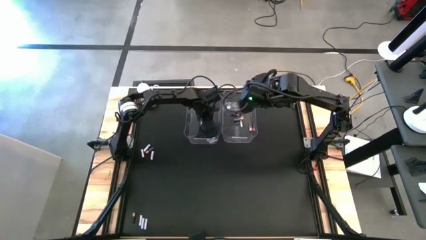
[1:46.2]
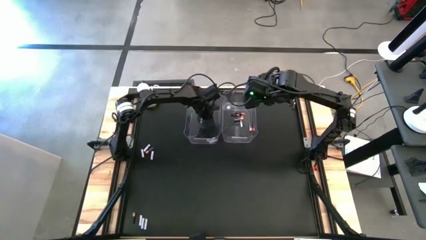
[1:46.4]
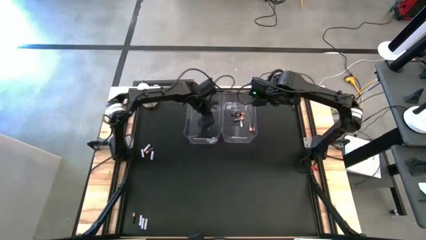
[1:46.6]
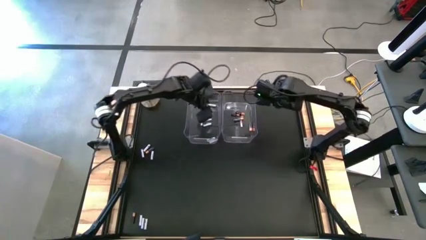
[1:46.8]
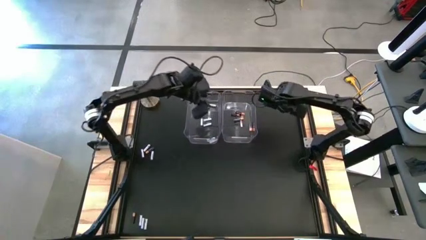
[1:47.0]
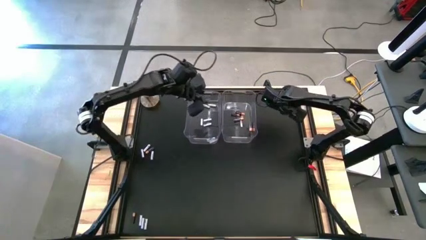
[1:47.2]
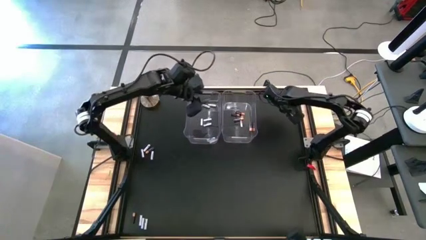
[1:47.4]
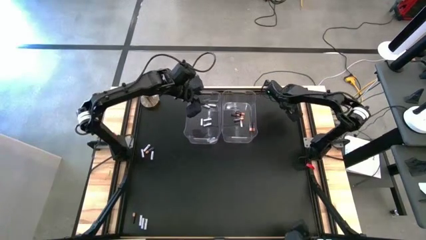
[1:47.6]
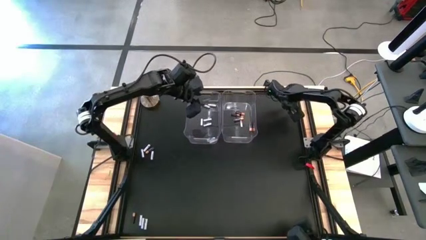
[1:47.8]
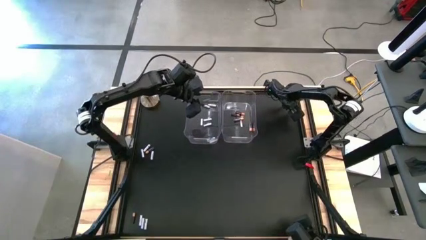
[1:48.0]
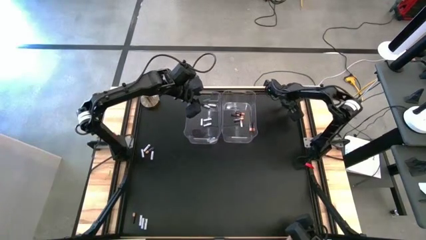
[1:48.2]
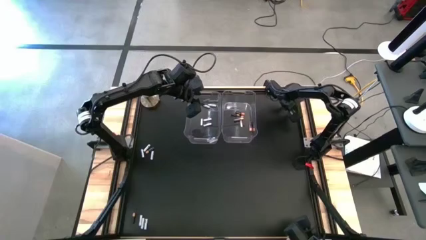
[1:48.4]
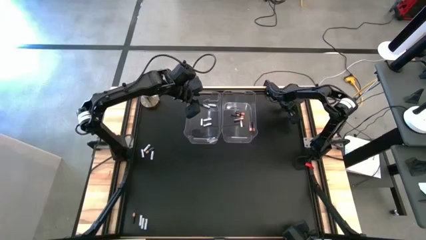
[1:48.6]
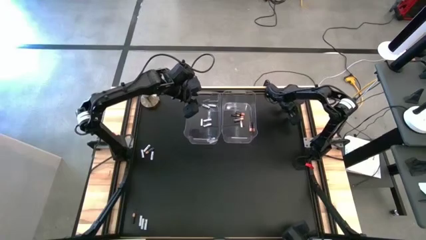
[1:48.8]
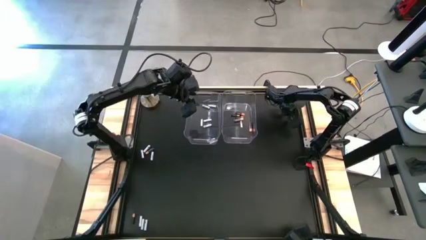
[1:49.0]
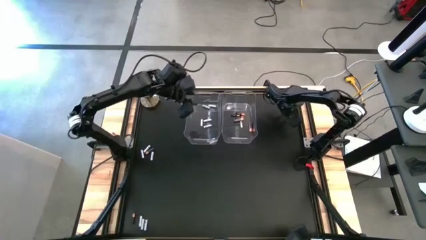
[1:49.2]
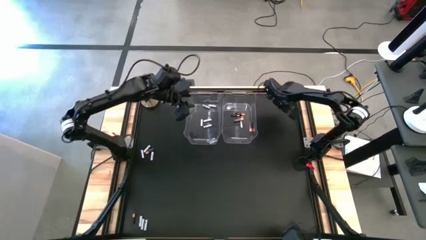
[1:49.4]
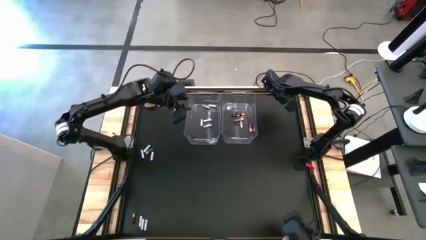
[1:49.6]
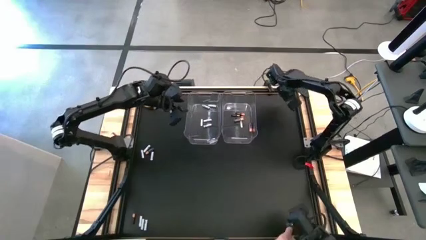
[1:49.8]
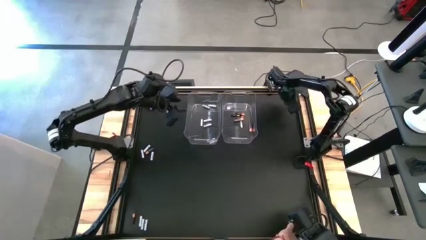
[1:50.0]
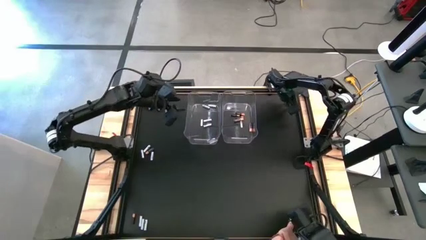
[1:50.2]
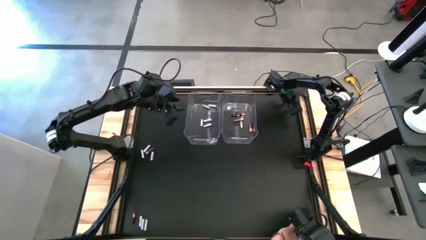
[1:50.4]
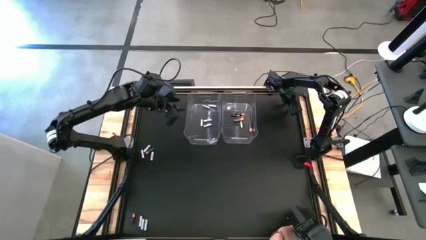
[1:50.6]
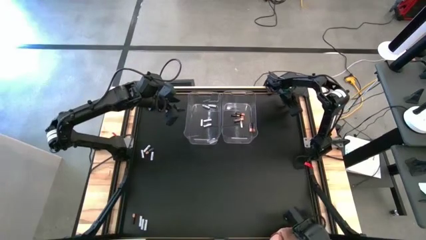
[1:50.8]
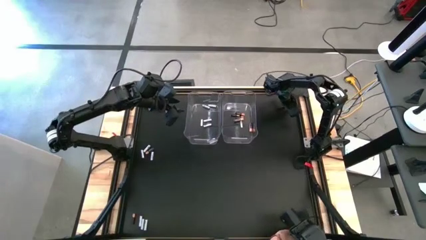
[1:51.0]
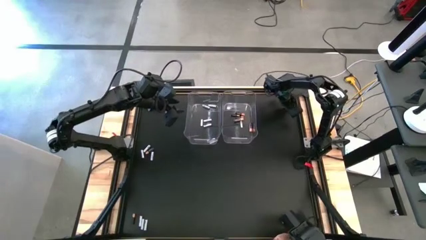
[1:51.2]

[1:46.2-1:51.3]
Task: Sort batteries
Put the brown battery into the right transparent bin

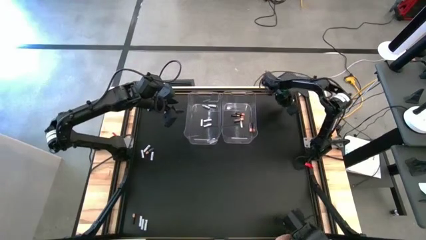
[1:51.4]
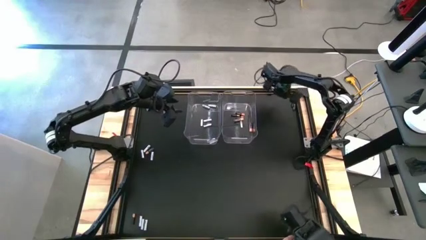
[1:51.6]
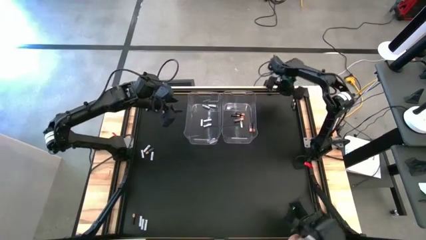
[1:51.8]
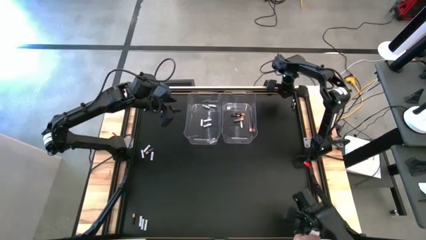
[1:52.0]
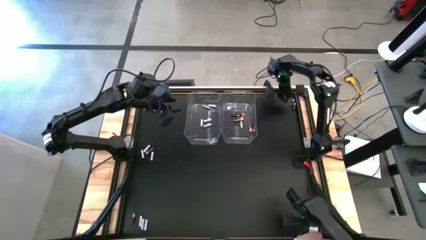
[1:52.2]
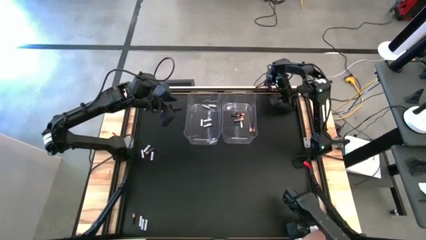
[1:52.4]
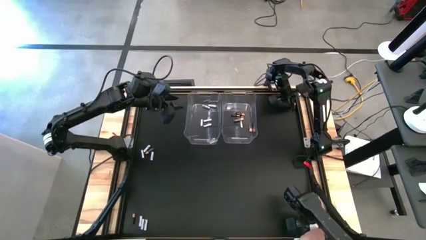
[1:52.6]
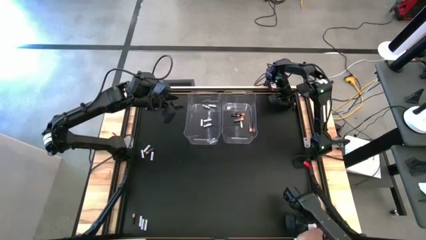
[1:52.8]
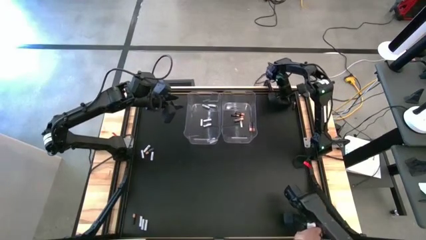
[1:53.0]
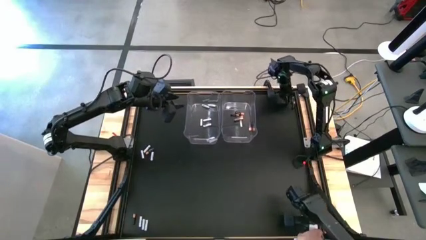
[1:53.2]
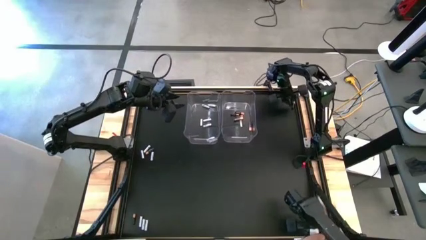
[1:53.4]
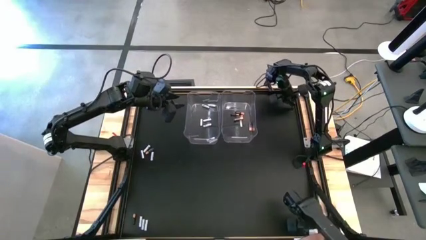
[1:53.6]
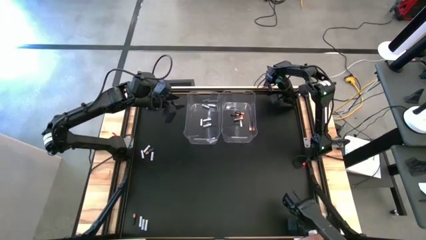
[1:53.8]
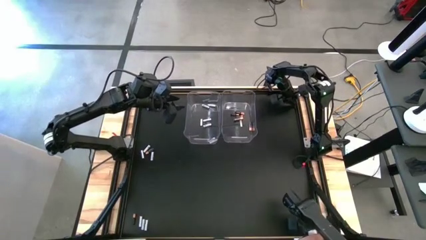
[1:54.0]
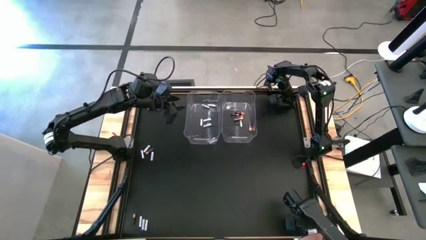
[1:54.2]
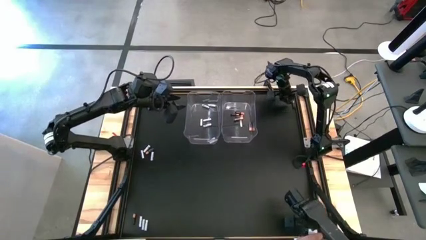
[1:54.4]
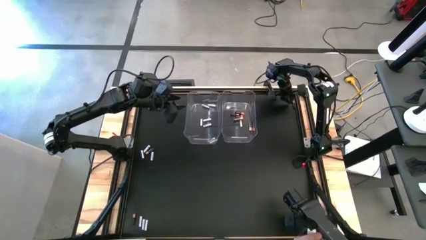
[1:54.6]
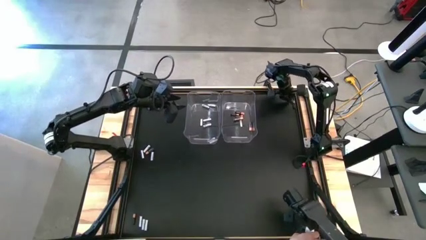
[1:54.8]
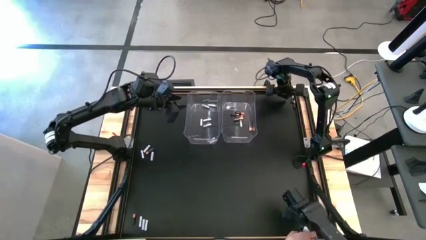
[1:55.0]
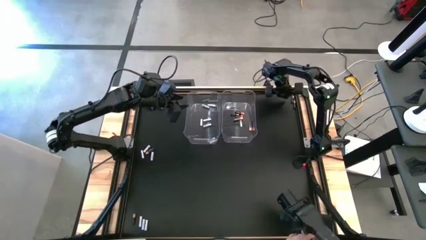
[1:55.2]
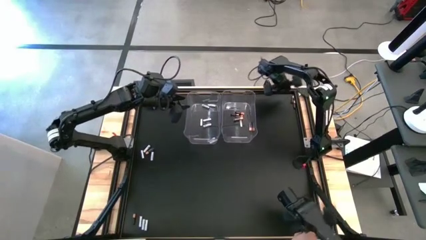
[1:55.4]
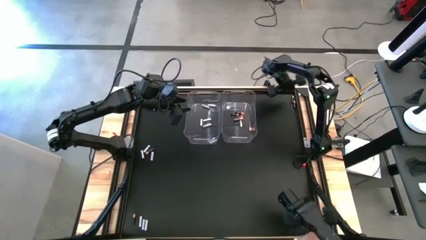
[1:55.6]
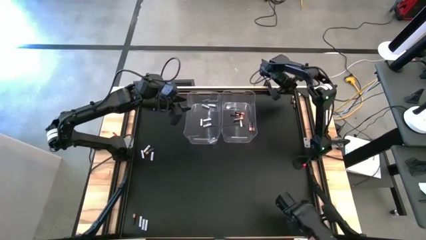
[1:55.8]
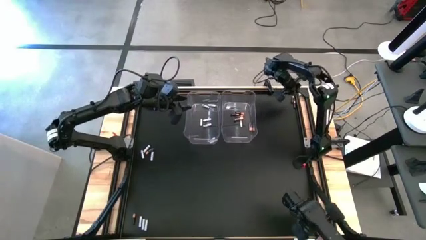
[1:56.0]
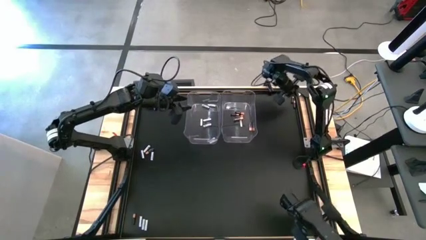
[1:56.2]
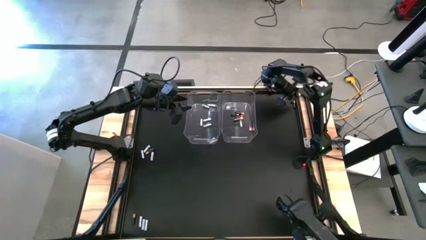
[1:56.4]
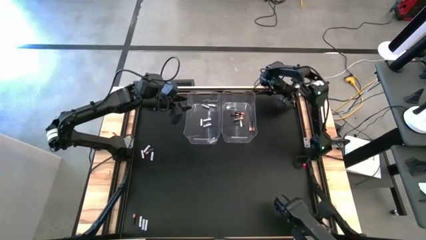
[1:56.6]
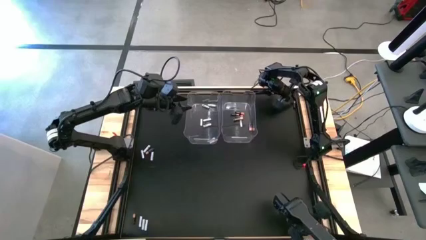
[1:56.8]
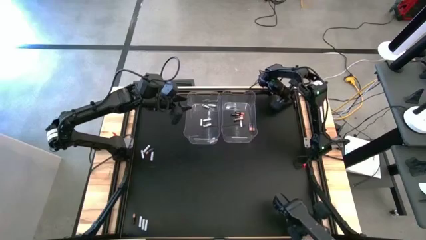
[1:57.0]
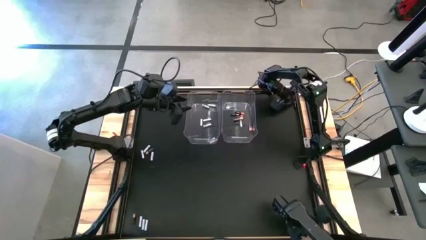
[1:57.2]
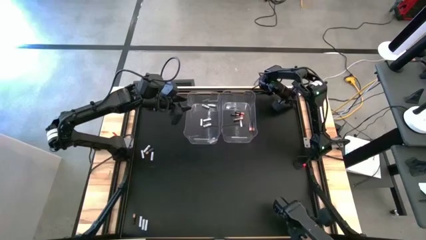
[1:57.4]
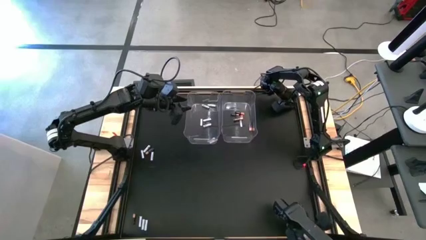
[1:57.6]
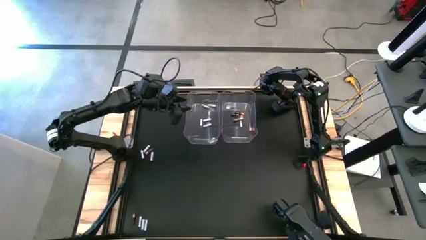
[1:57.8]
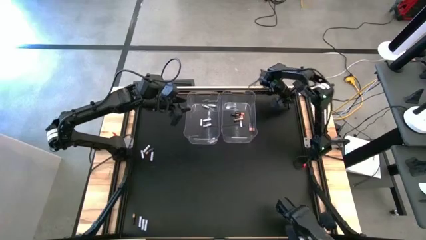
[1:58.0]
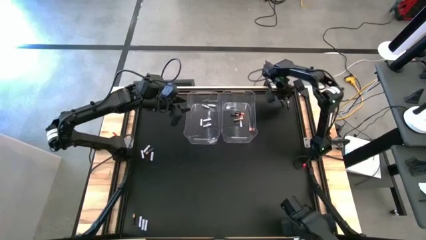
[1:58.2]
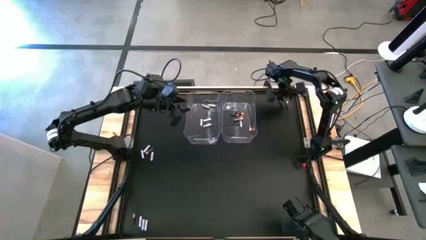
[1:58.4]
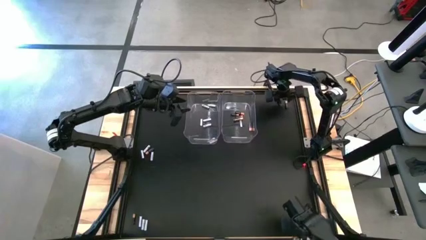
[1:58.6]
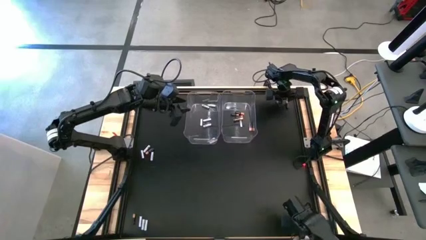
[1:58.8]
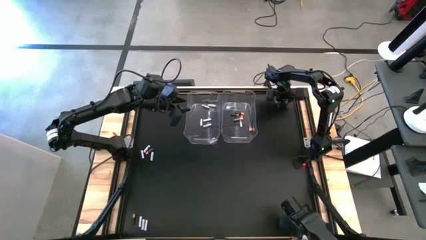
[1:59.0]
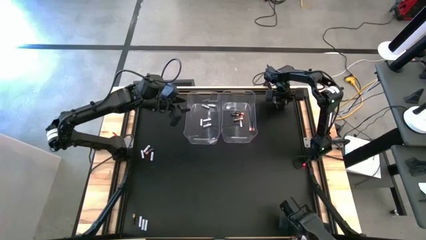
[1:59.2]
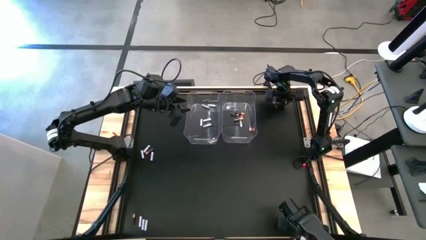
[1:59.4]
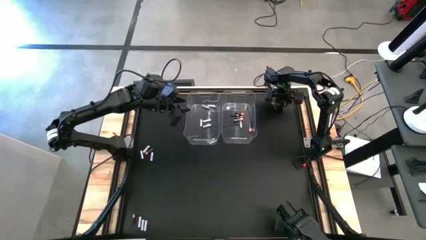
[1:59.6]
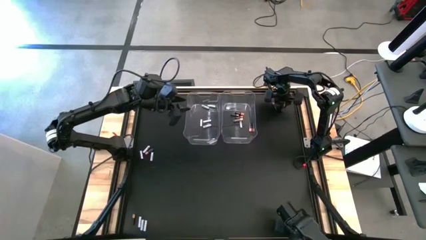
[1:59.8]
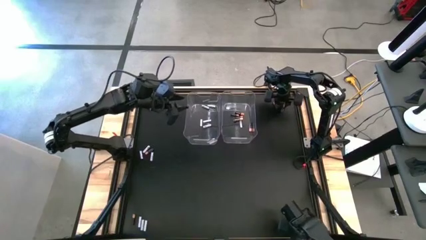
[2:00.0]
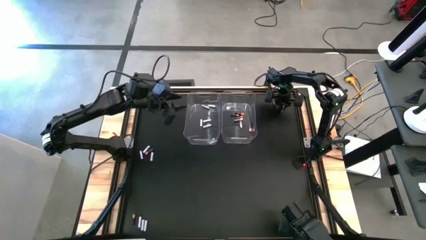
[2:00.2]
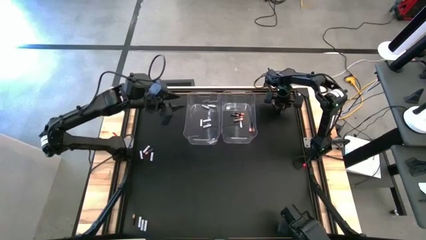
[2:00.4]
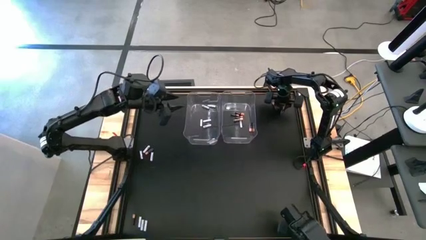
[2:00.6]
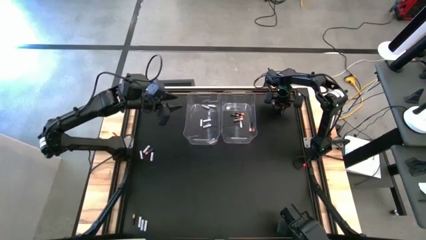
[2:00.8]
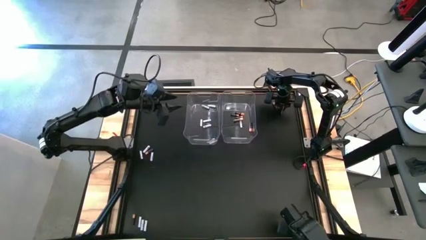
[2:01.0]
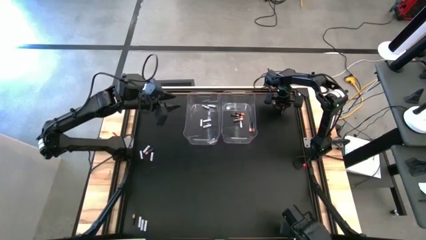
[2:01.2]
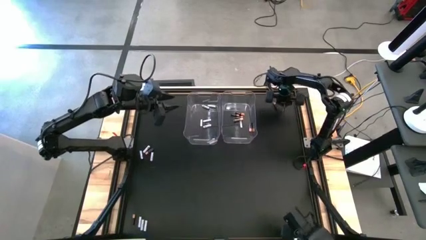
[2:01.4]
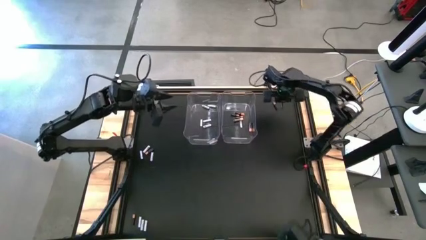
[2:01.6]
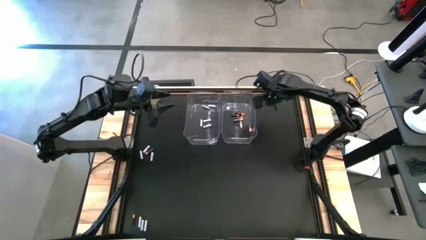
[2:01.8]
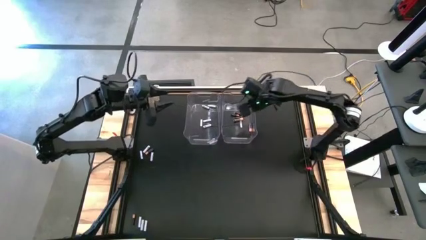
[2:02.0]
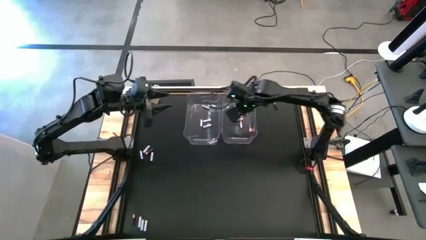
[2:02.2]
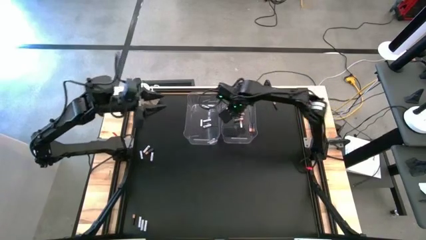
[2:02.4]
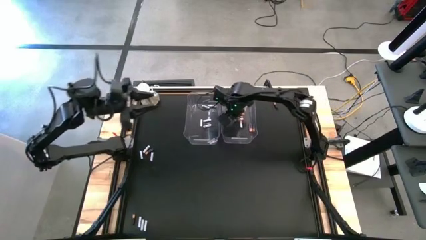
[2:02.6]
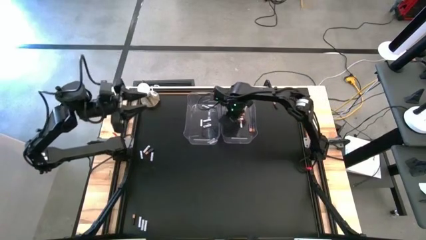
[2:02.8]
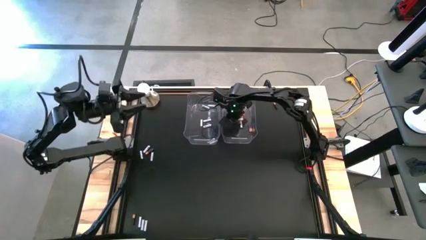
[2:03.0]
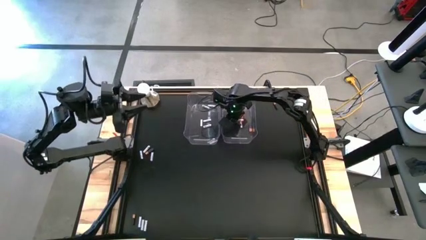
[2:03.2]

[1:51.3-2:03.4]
Put the brown battery into the right transparent bin
